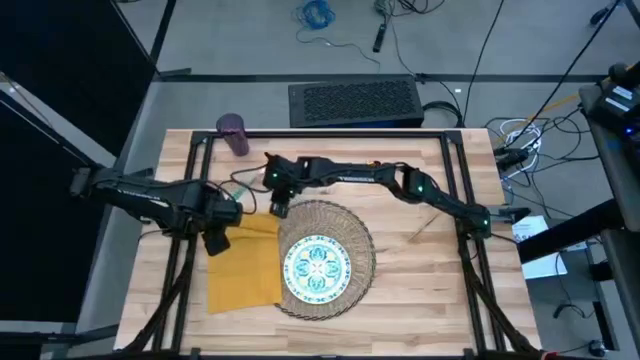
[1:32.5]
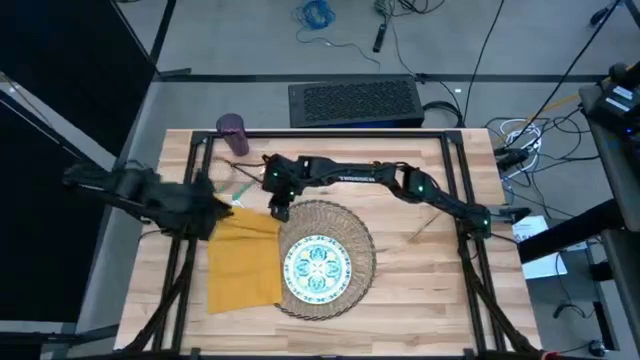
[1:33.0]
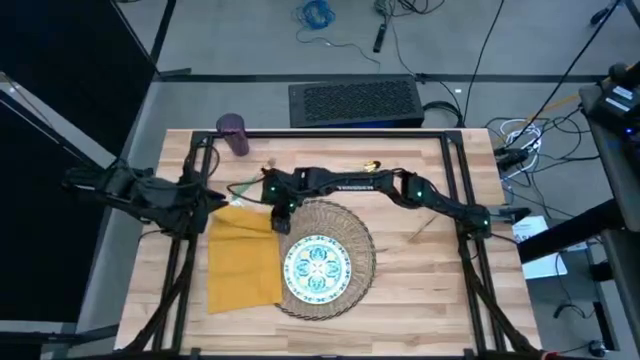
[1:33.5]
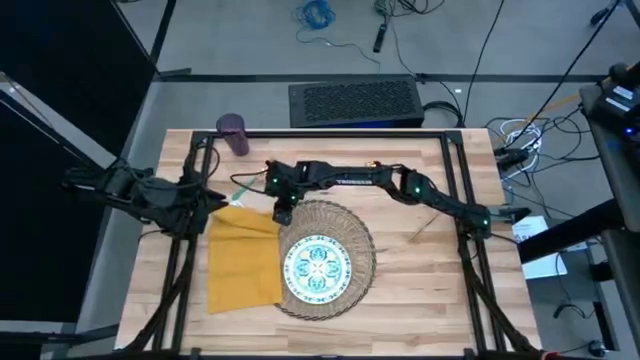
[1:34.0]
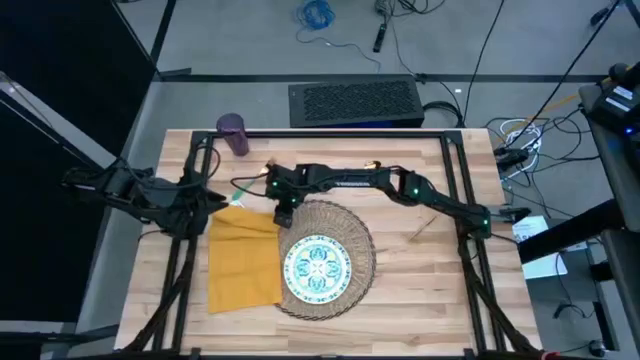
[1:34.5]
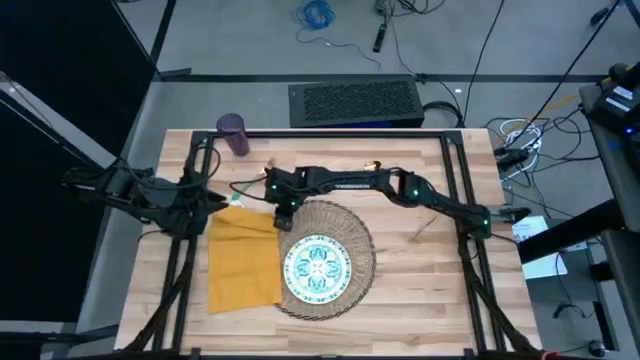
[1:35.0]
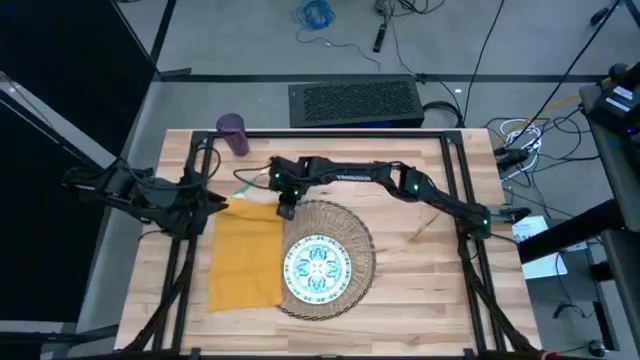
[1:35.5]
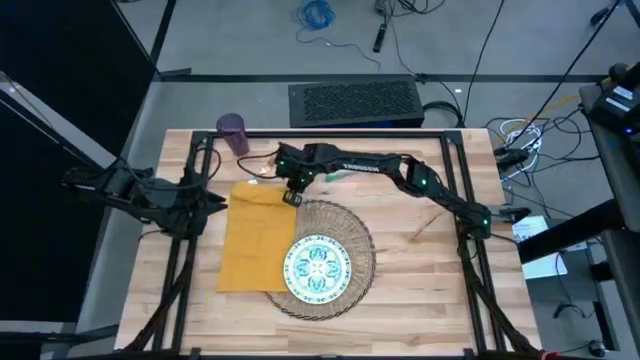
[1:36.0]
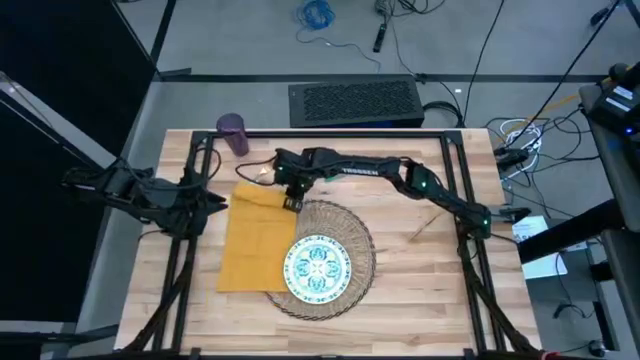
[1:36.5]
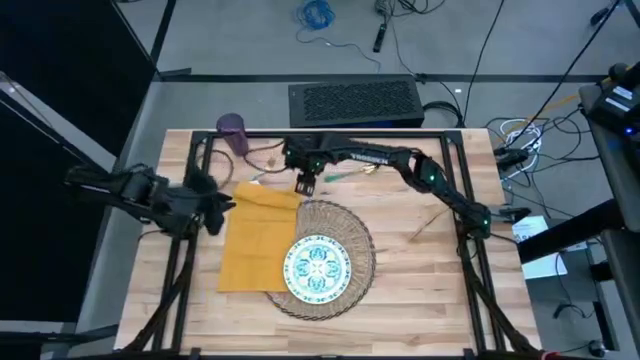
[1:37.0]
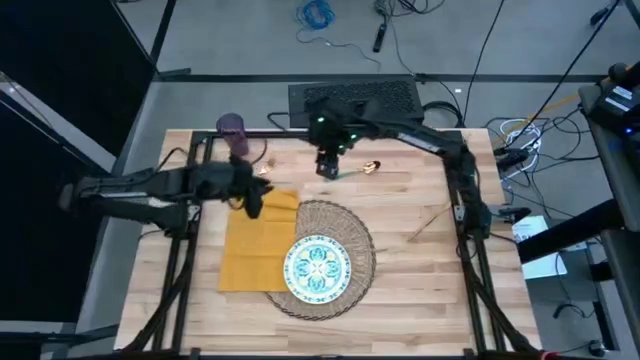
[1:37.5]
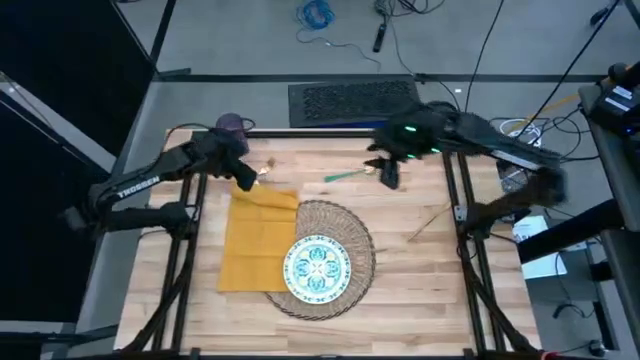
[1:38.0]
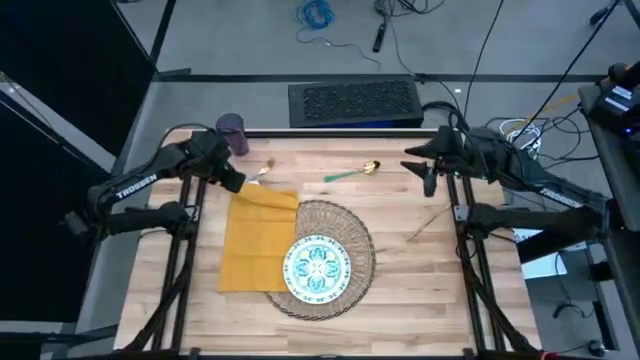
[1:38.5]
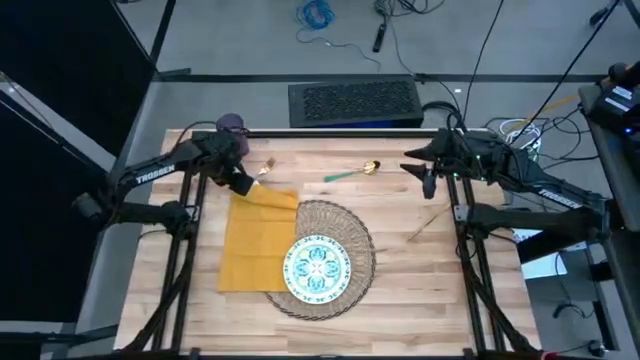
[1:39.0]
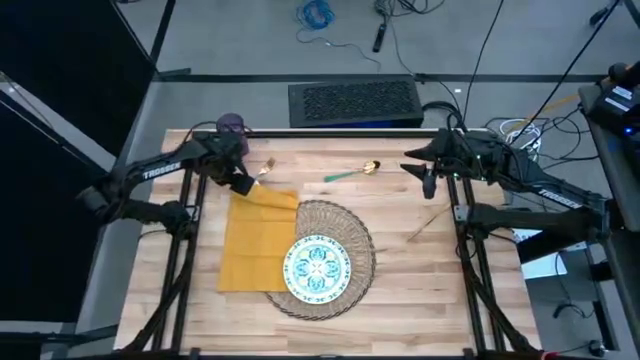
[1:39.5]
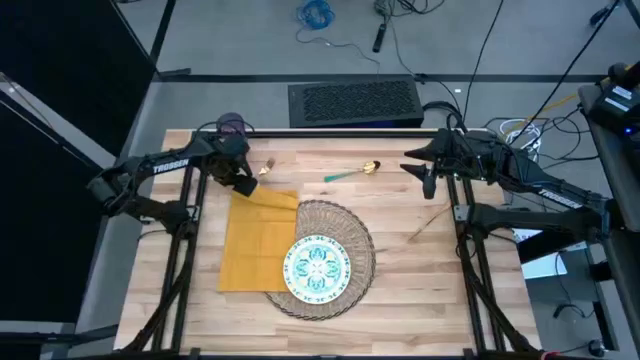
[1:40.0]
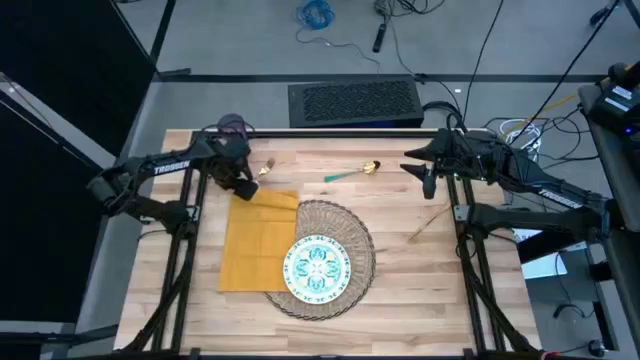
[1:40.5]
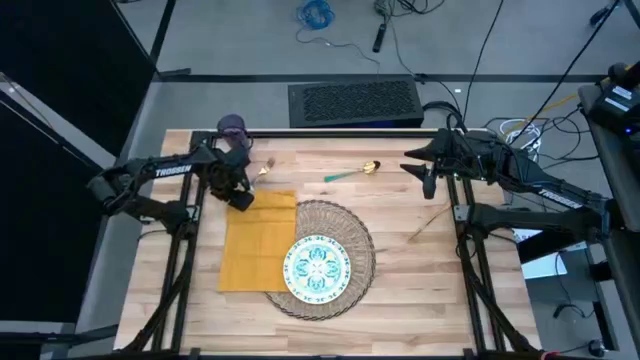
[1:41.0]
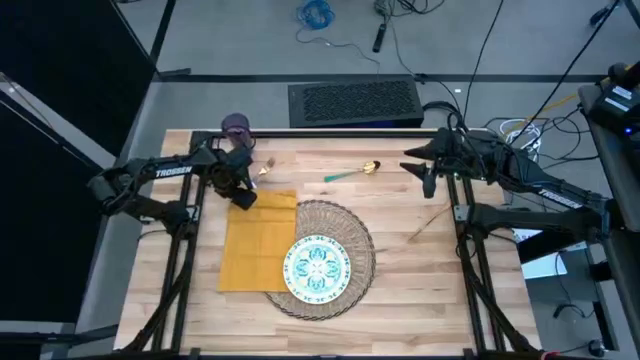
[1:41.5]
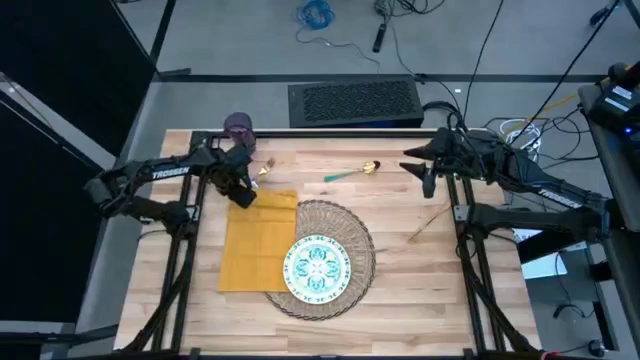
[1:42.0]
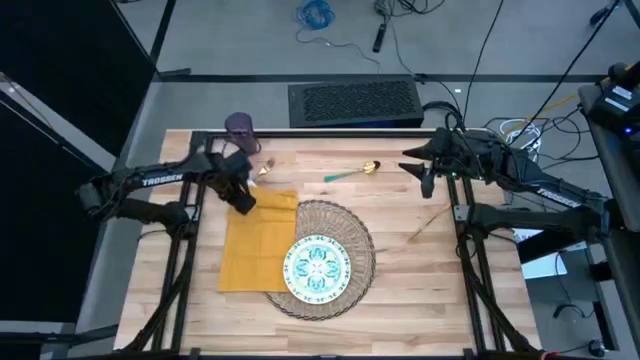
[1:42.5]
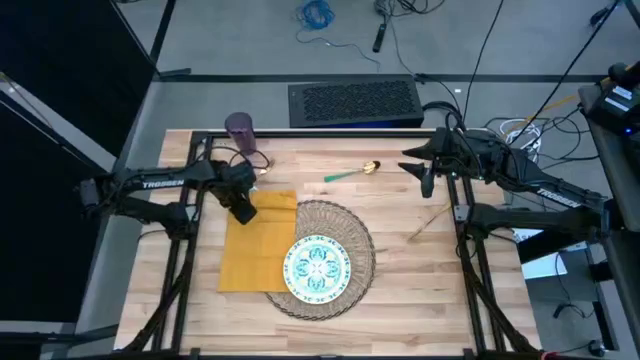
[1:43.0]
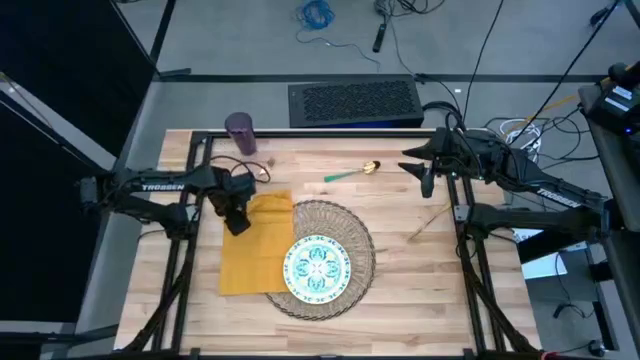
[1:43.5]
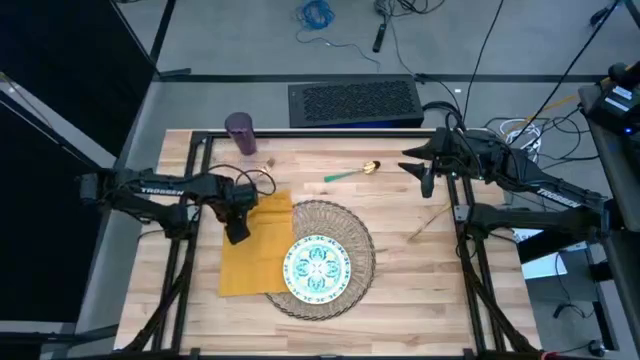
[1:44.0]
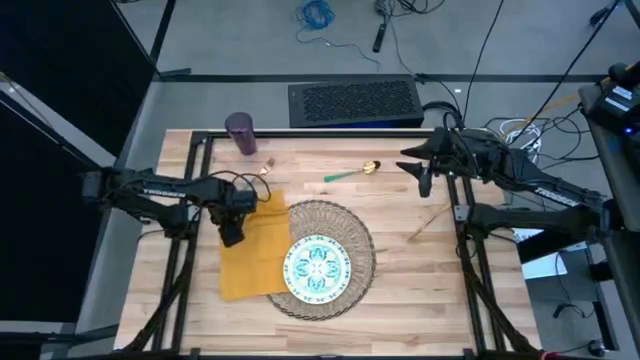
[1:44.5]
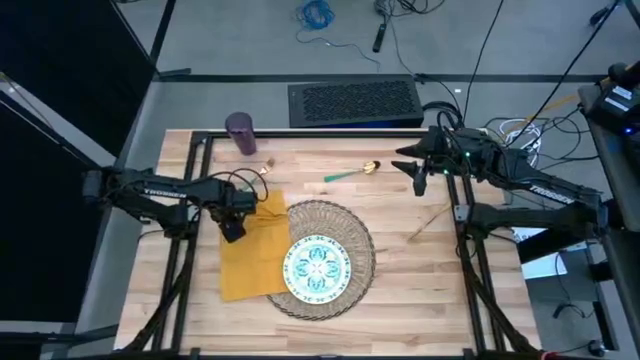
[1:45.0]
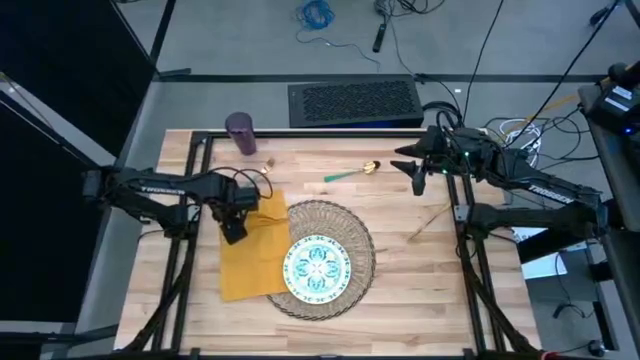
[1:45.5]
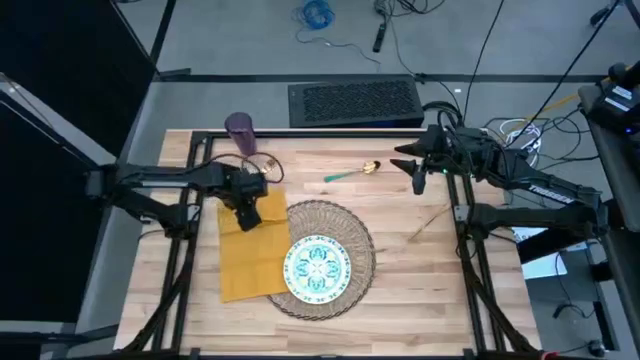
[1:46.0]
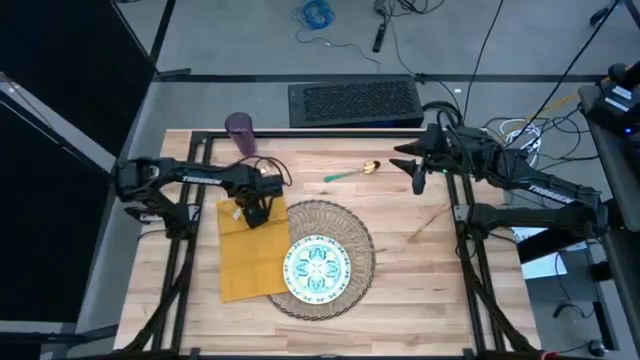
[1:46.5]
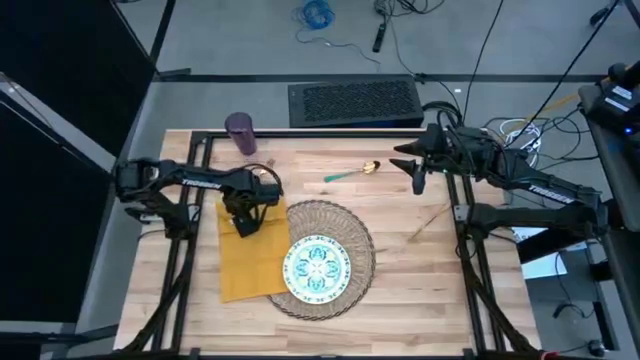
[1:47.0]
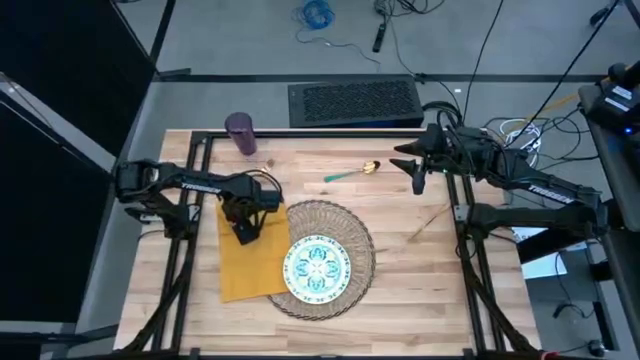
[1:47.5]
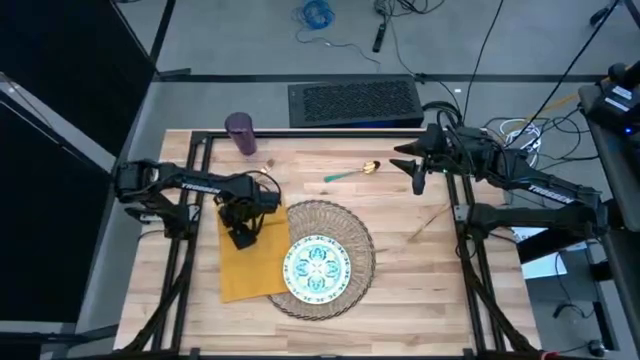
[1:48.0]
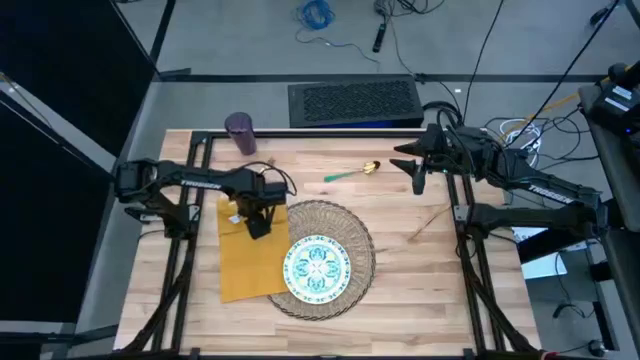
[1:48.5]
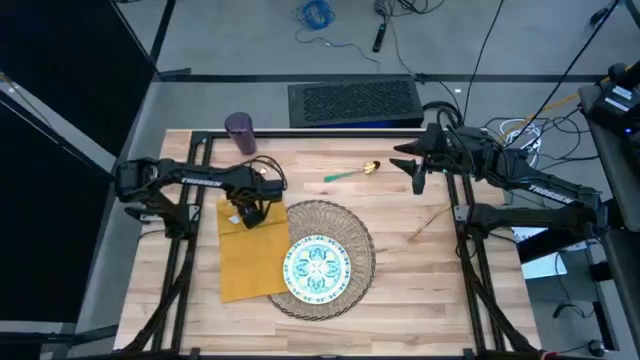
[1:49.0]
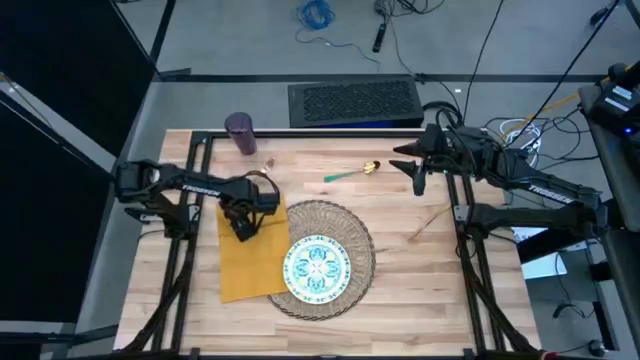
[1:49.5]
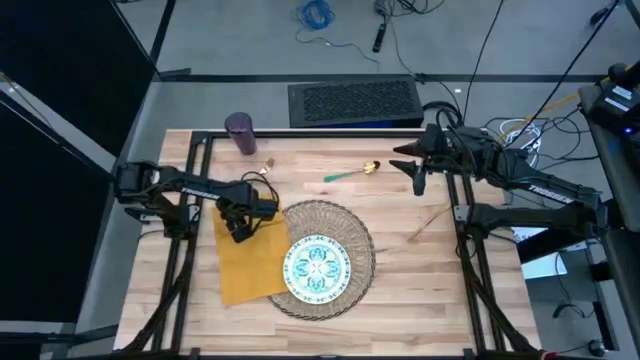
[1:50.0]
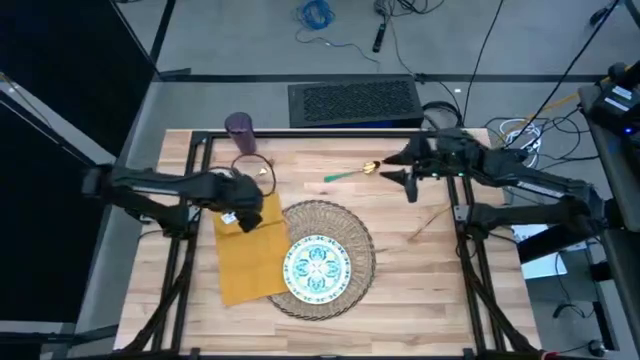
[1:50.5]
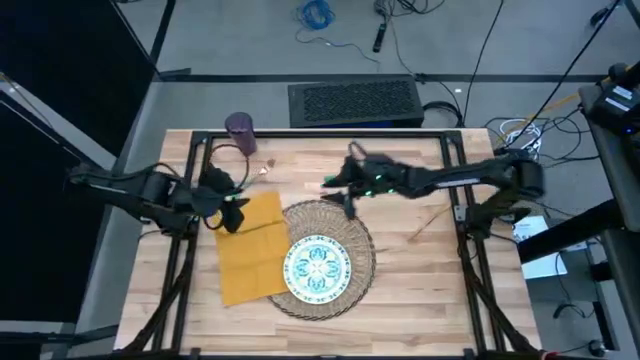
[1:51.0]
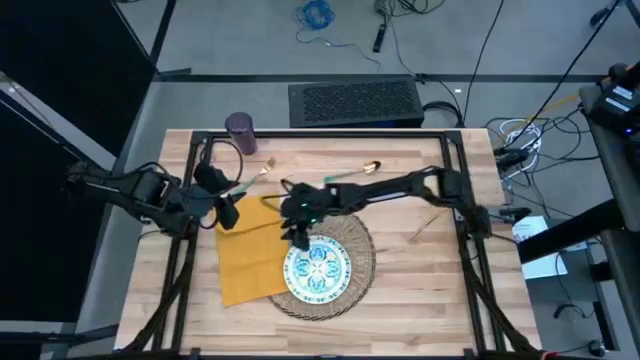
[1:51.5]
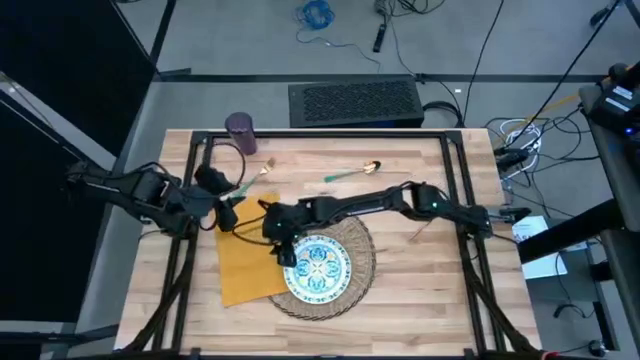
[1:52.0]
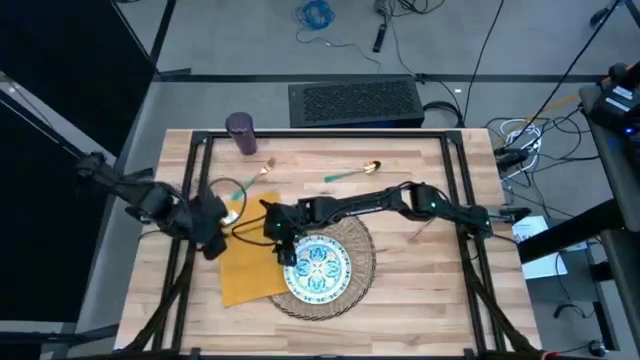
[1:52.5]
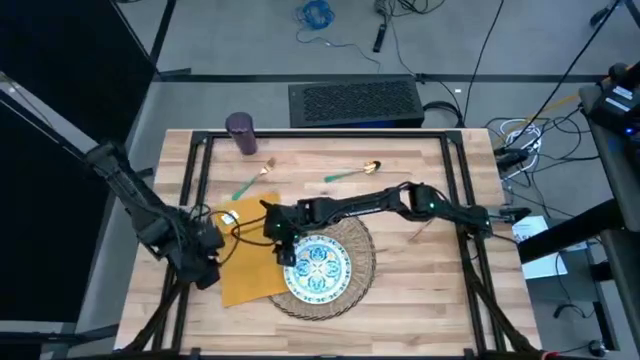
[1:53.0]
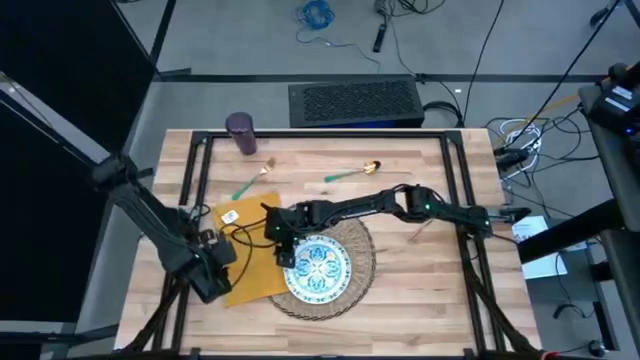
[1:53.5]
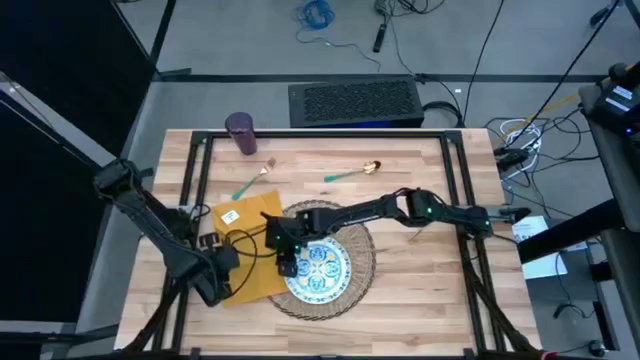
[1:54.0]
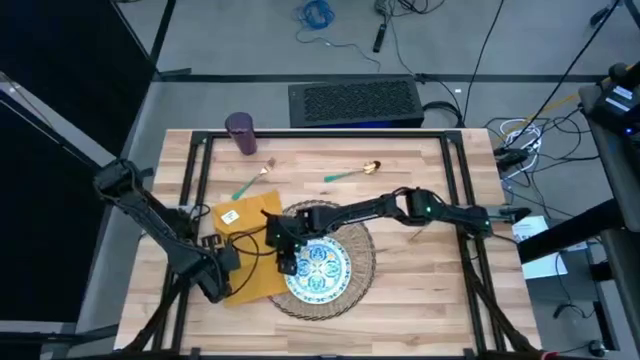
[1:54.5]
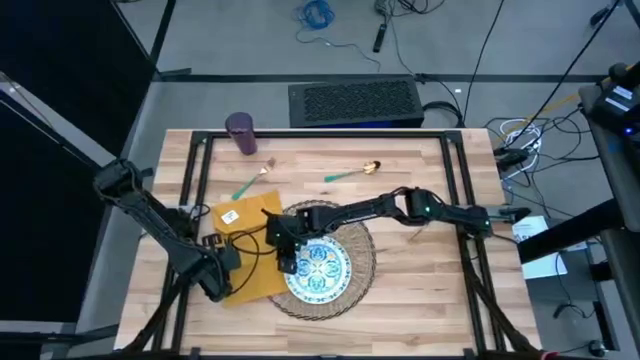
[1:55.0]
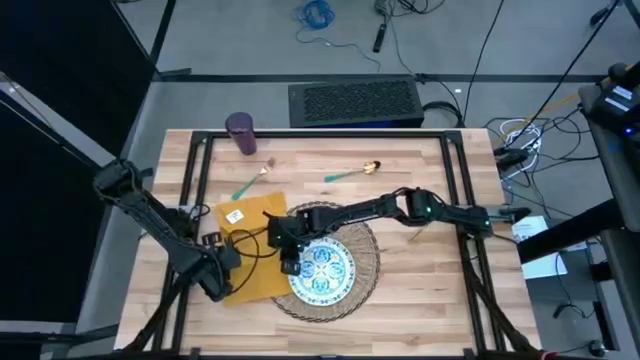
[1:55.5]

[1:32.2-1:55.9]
Task: Set table place
Fold the yellow table napkin
